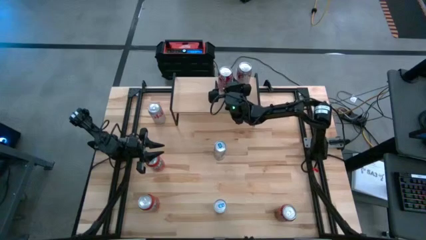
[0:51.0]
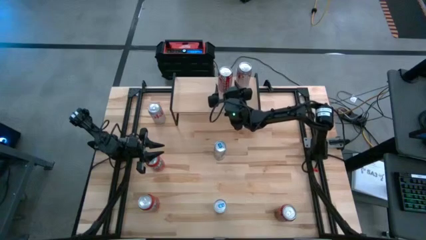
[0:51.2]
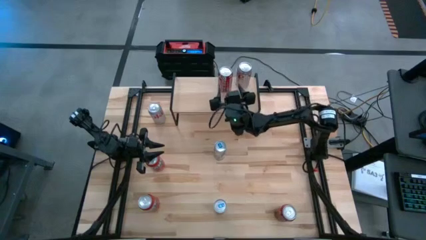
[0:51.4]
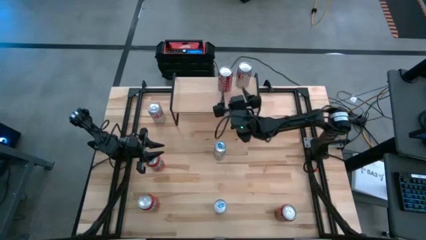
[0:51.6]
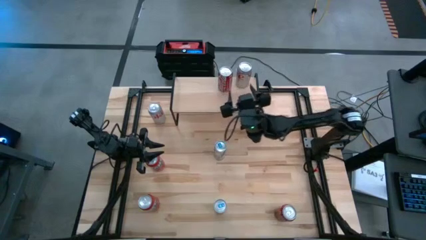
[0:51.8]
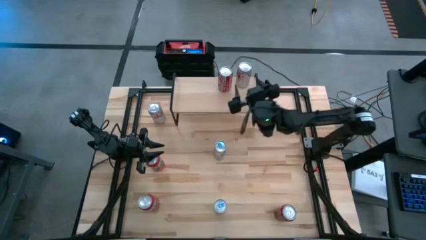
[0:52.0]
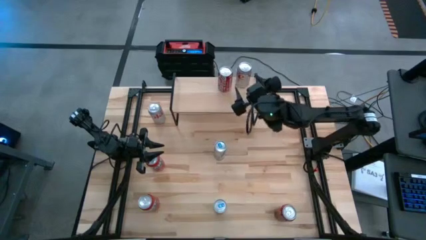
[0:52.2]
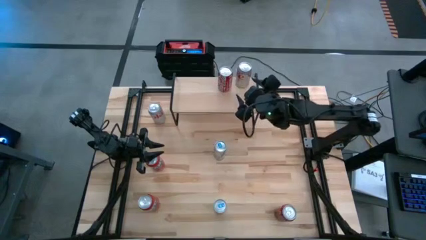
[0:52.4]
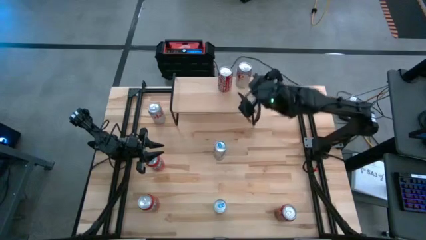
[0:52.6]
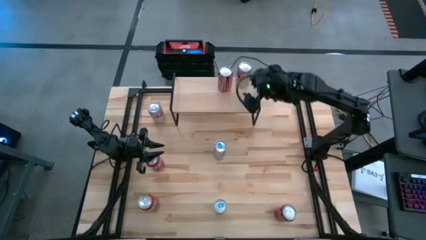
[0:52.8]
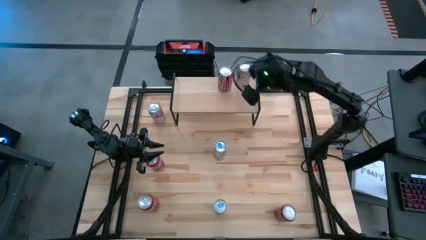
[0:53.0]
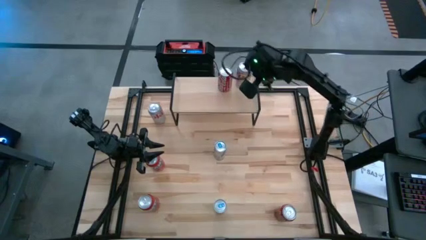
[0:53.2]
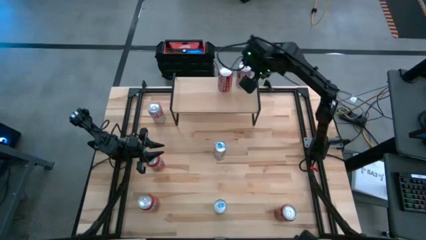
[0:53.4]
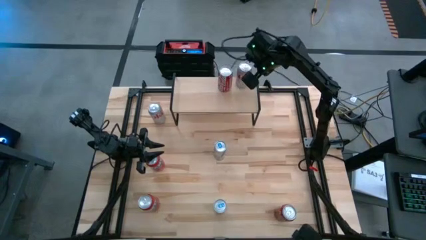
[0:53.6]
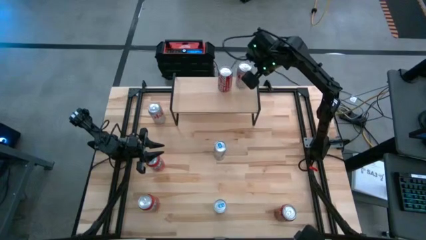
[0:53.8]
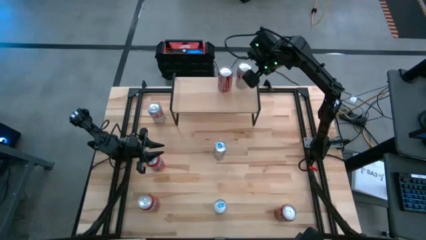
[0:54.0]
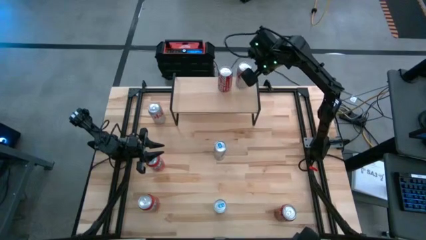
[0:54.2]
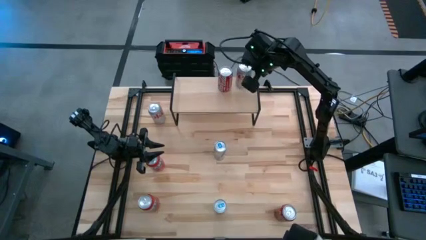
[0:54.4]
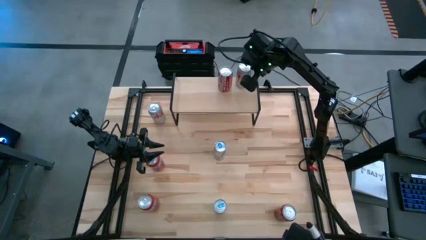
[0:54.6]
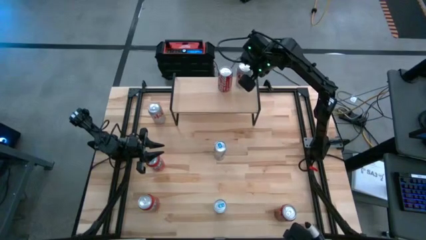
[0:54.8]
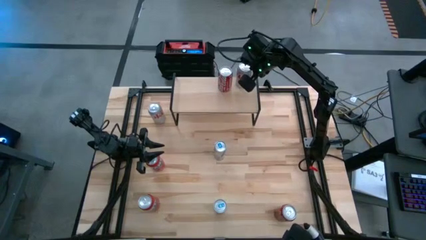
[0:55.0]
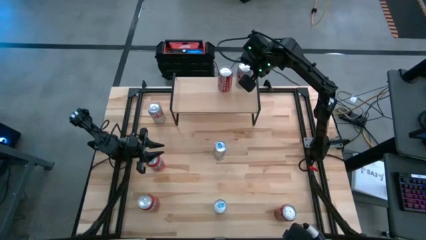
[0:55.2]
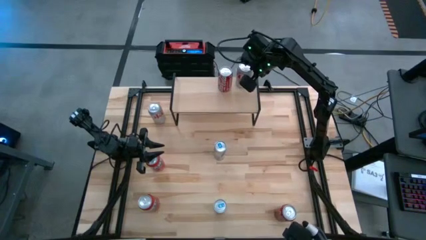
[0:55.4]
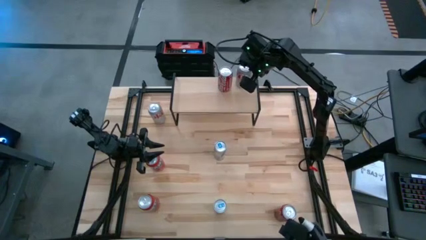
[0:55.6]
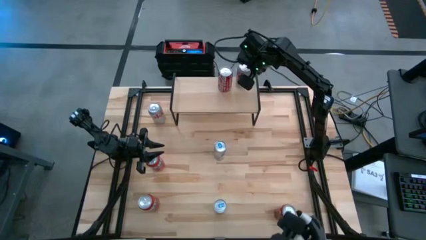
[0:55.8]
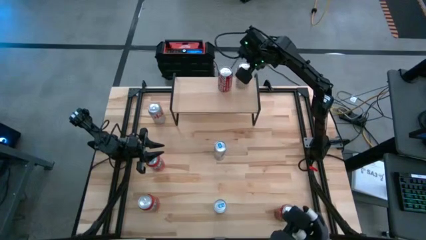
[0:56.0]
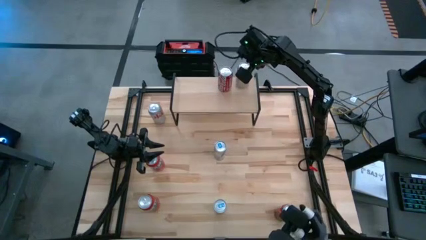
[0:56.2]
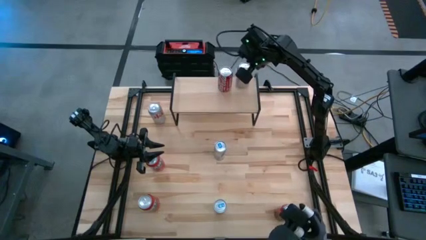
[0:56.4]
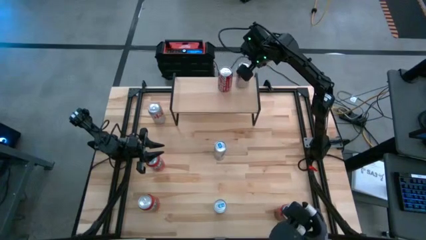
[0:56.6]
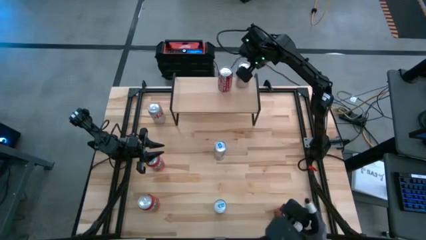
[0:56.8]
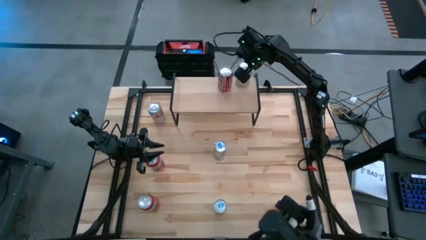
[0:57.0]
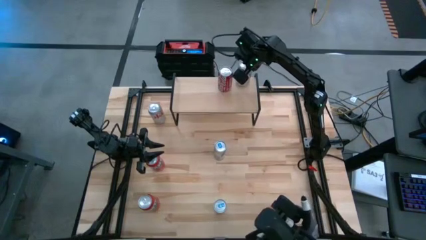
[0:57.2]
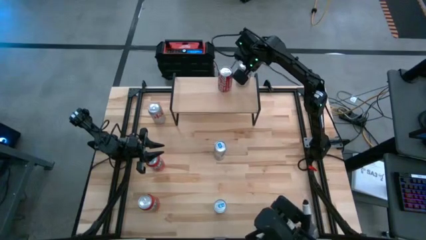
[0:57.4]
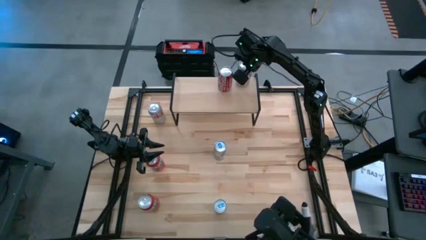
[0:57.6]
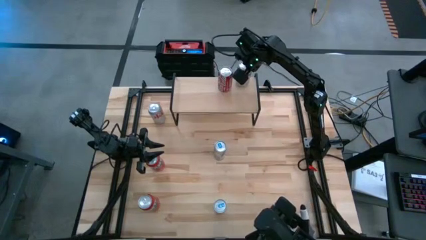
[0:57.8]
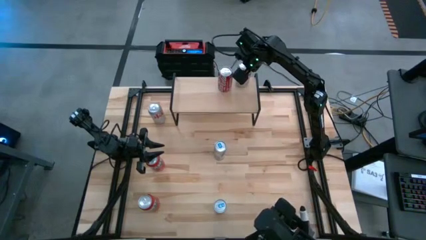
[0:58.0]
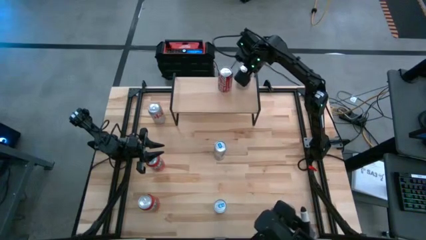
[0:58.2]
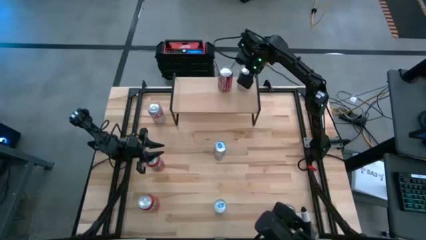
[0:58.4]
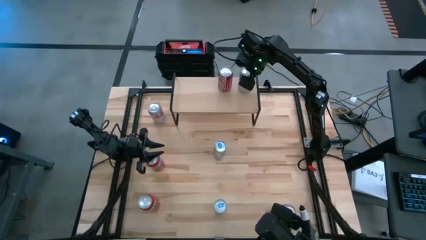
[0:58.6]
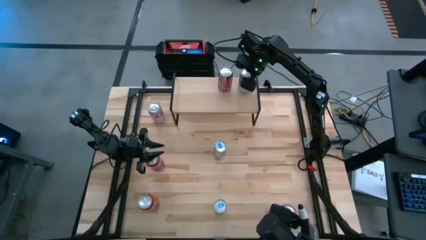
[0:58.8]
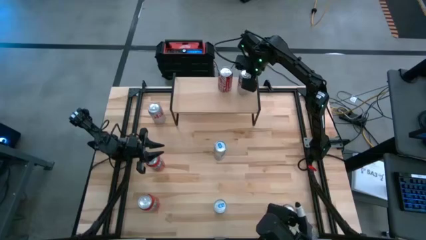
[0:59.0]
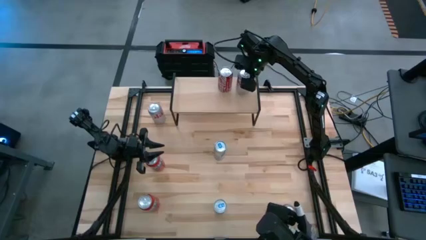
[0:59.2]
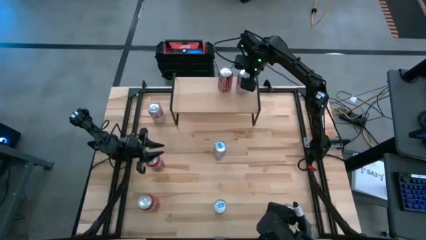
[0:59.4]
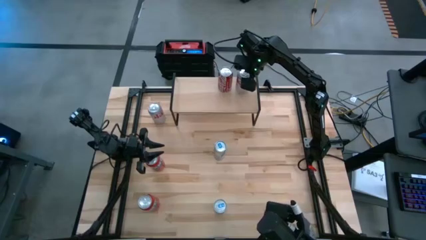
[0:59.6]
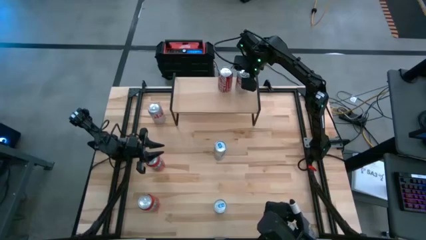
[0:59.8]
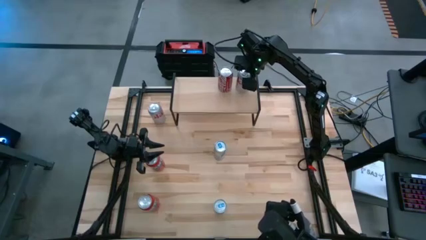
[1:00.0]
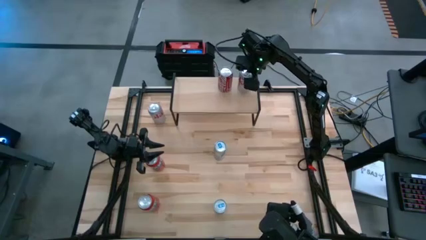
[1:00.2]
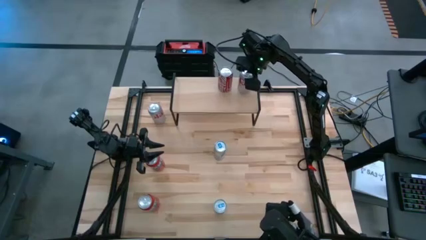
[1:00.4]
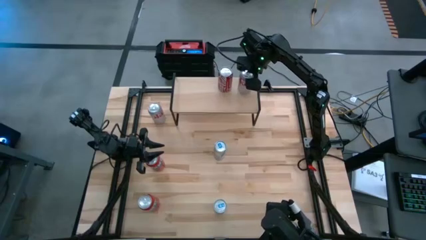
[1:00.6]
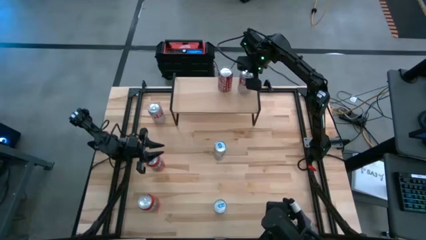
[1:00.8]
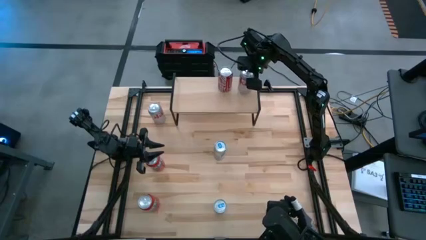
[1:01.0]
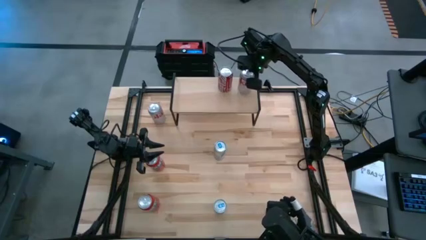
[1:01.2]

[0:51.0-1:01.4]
Task: Place canned beverage on shelf
Adjust the red and silver soda can on the shelf

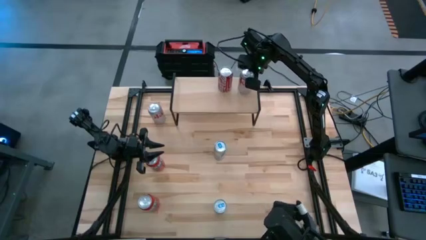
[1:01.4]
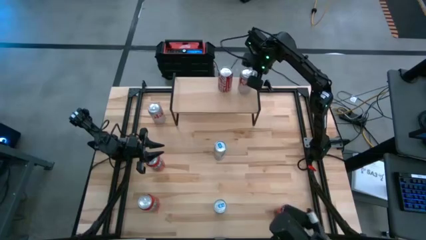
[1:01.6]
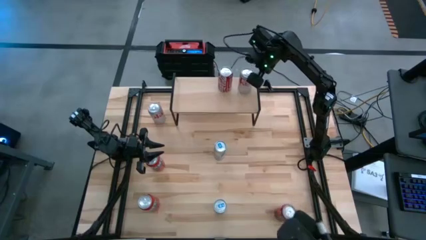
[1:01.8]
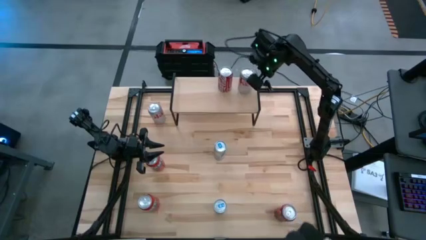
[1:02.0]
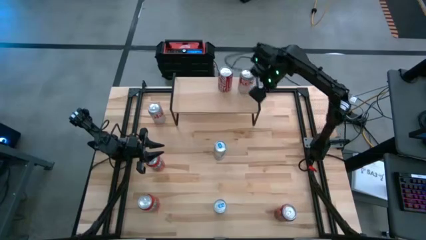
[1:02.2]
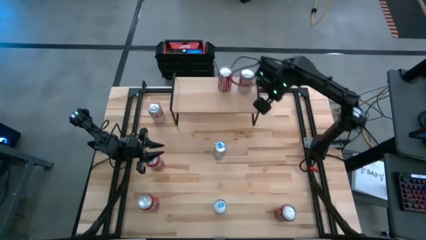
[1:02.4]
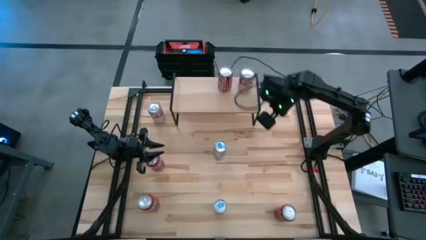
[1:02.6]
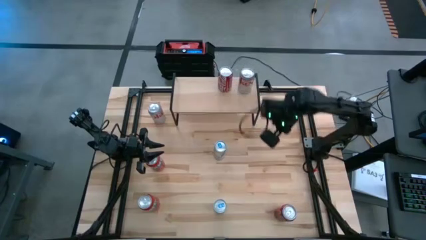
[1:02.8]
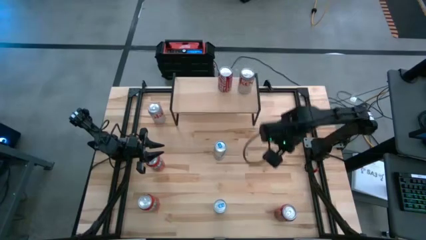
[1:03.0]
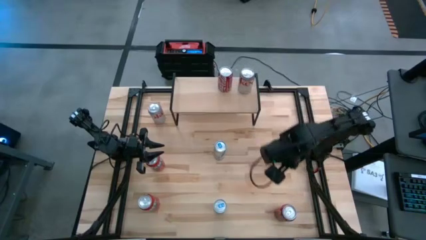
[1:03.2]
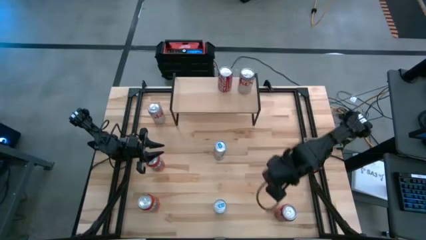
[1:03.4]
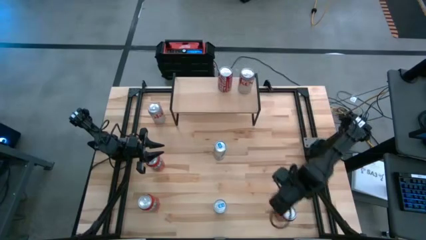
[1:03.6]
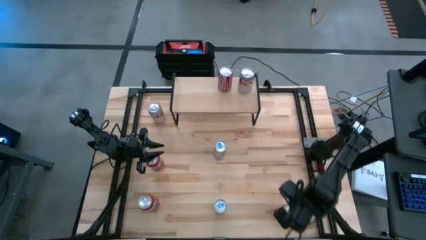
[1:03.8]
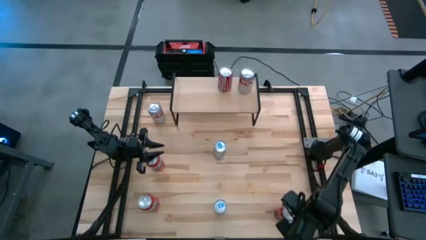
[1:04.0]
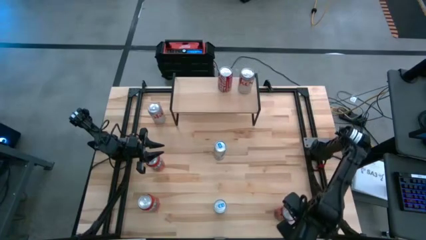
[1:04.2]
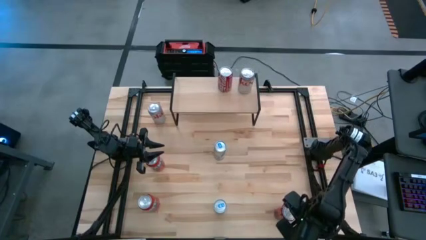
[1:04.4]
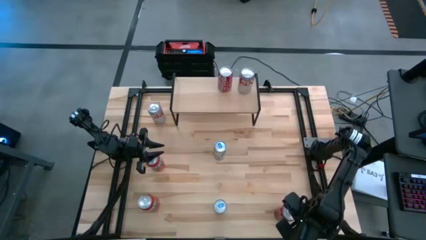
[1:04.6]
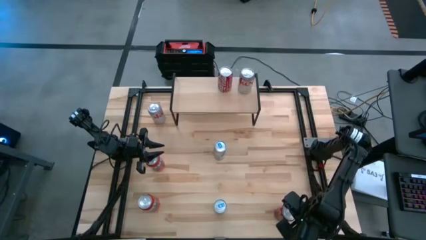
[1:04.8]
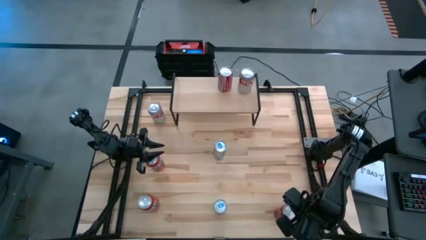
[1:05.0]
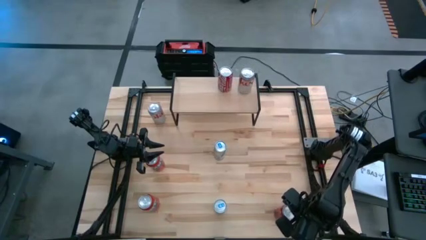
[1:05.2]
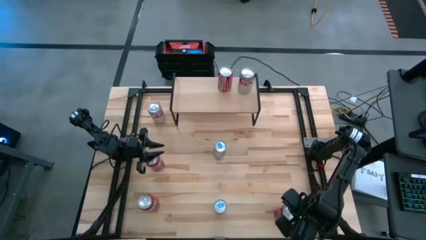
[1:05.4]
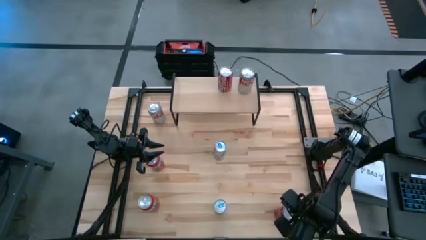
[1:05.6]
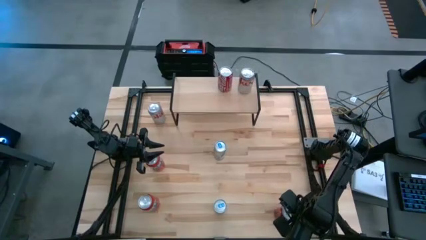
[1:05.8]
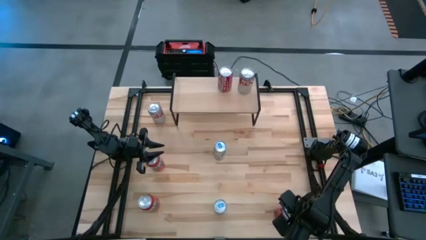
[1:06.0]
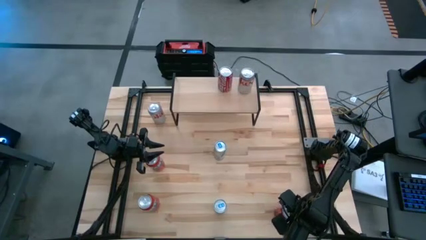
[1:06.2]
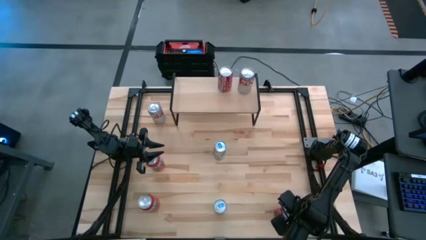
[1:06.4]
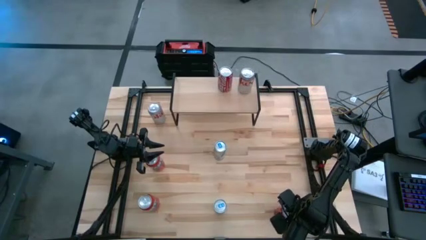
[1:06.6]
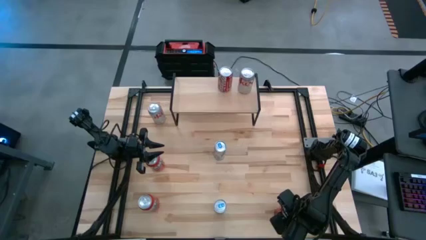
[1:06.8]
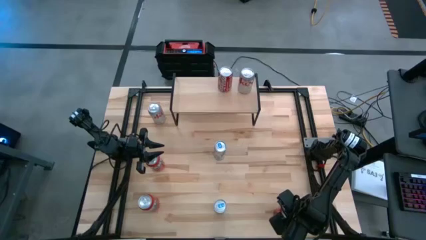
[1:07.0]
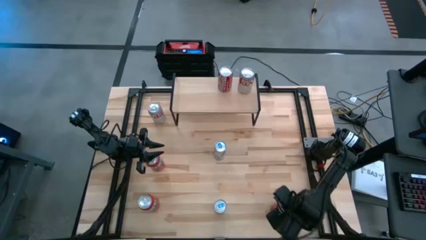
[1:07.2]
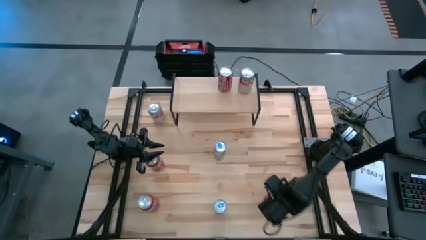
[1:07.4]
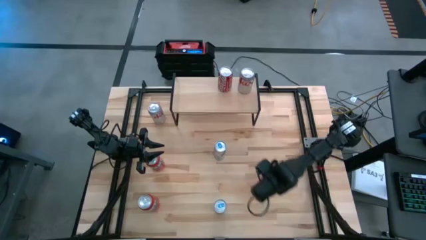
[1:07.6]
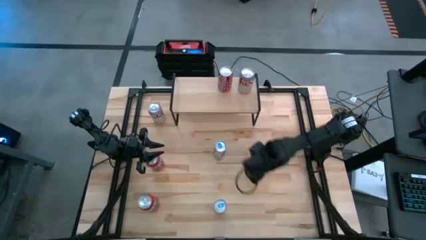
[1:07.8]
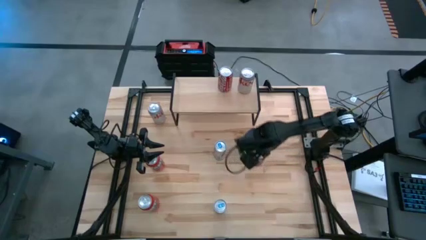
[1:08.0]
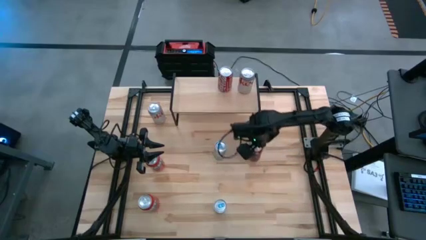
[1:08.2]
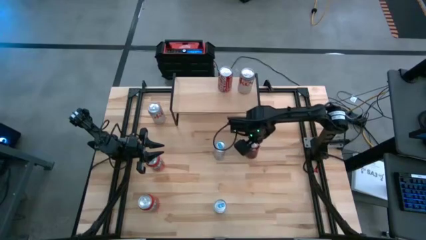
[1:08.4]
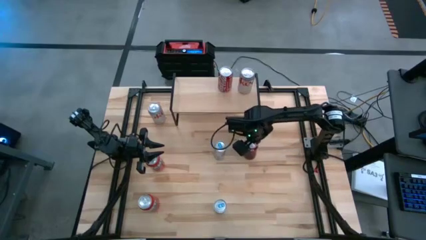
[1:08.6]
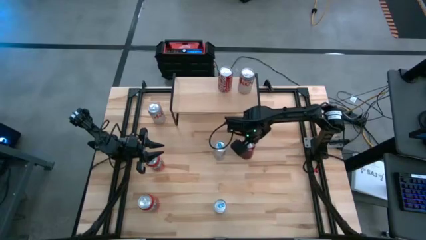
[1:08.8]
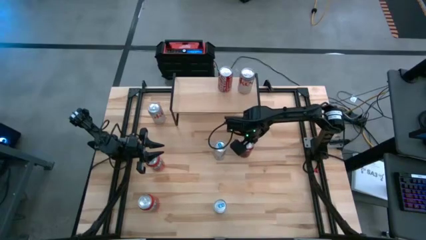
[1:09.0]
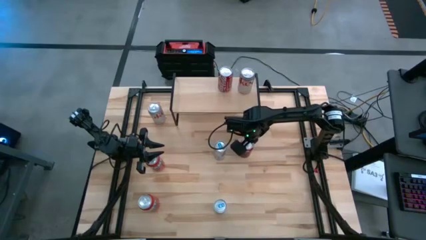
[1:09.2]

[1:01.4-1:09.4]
Move the red and white soda can
